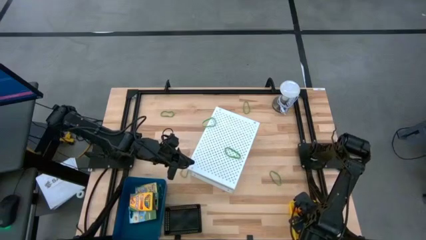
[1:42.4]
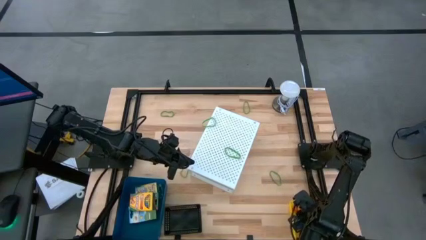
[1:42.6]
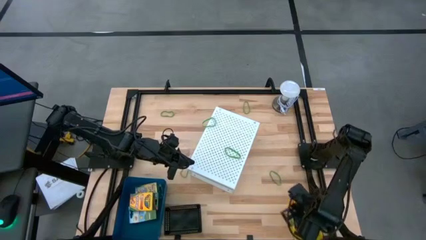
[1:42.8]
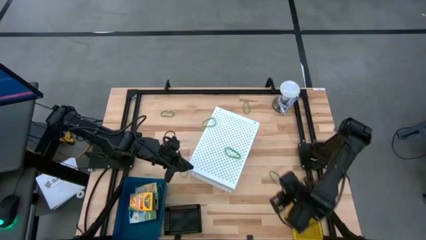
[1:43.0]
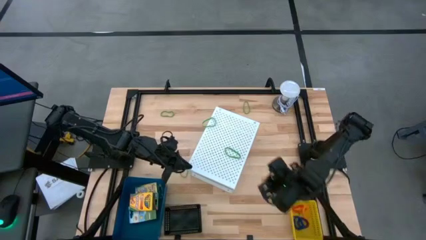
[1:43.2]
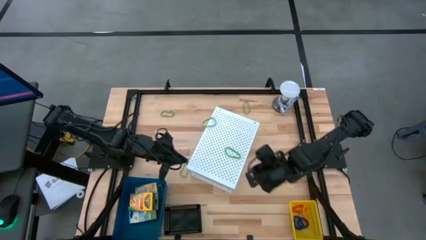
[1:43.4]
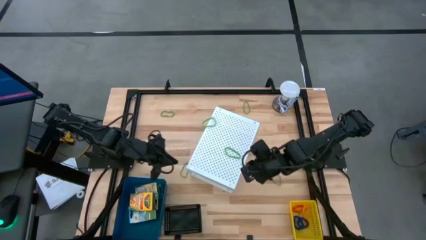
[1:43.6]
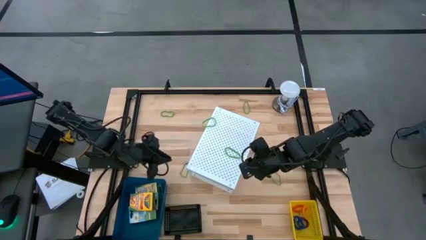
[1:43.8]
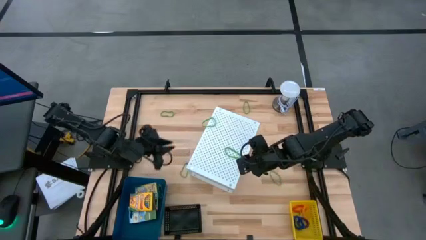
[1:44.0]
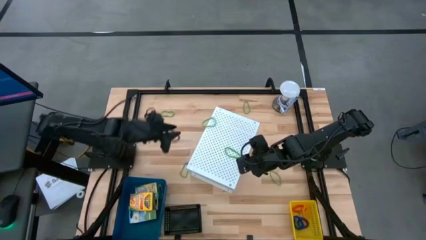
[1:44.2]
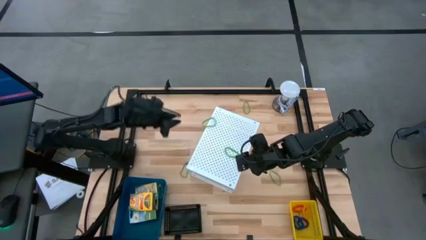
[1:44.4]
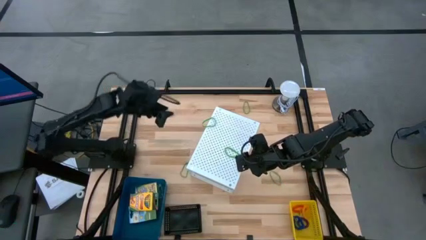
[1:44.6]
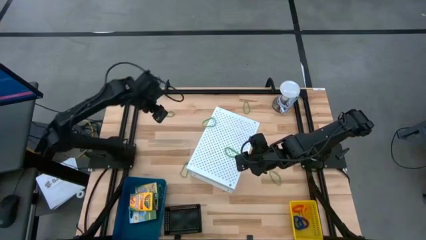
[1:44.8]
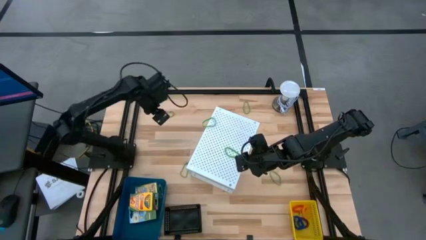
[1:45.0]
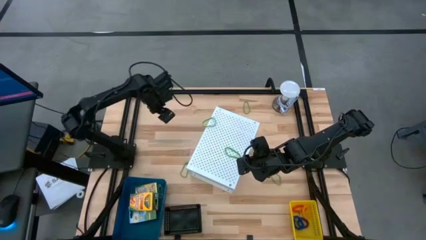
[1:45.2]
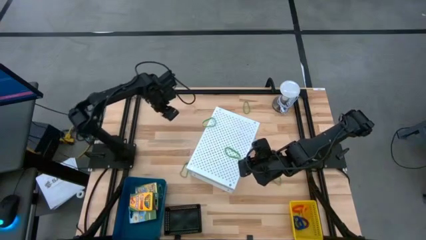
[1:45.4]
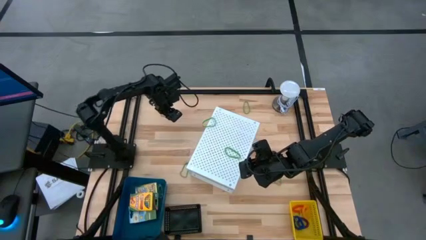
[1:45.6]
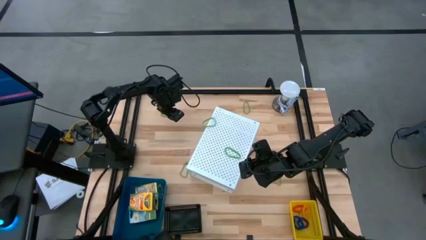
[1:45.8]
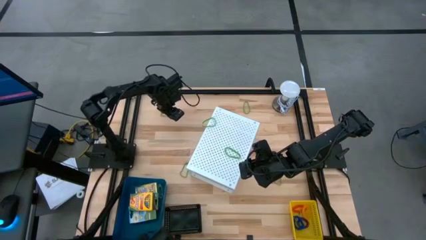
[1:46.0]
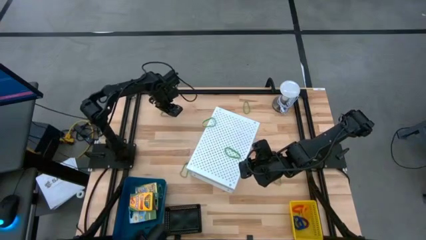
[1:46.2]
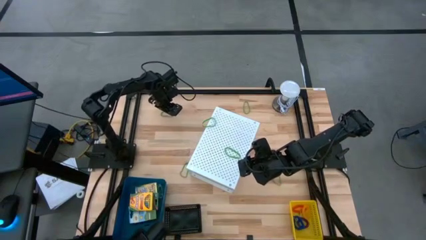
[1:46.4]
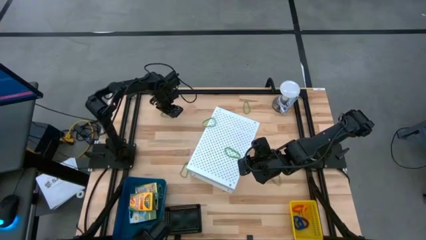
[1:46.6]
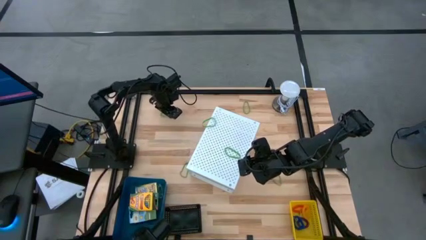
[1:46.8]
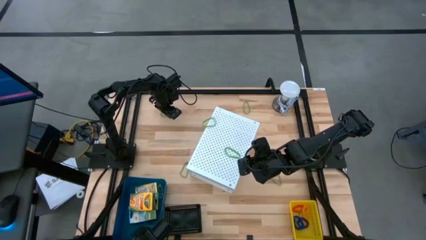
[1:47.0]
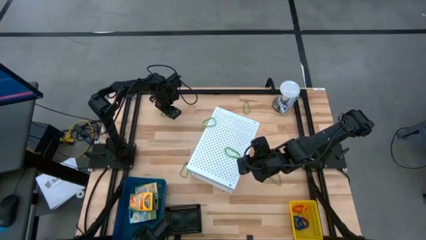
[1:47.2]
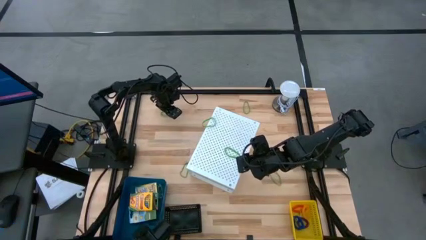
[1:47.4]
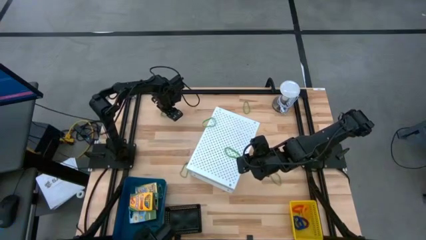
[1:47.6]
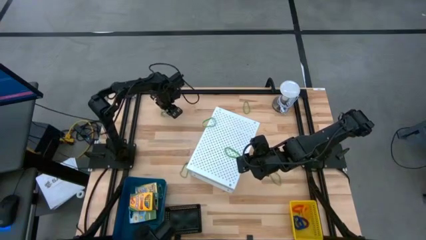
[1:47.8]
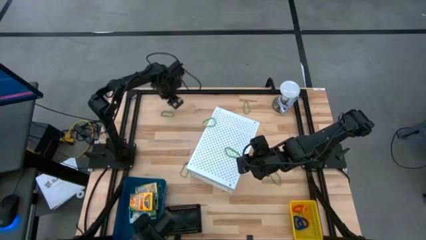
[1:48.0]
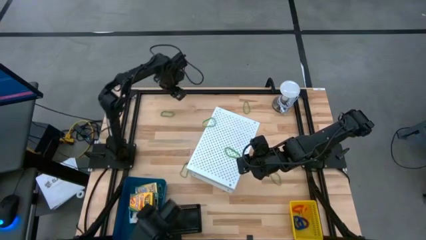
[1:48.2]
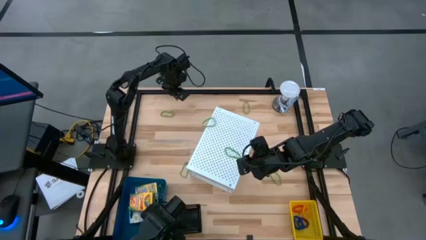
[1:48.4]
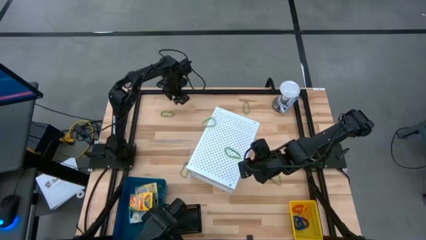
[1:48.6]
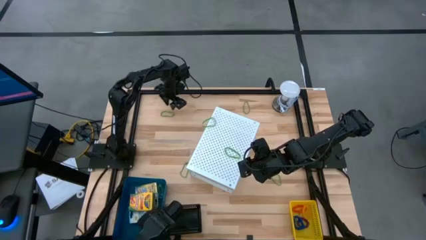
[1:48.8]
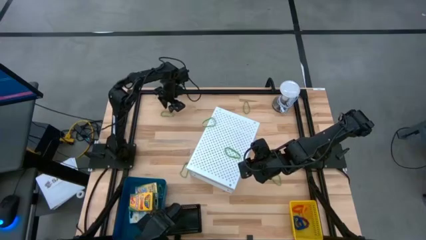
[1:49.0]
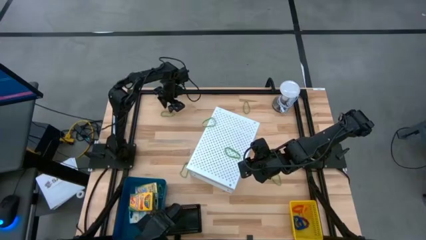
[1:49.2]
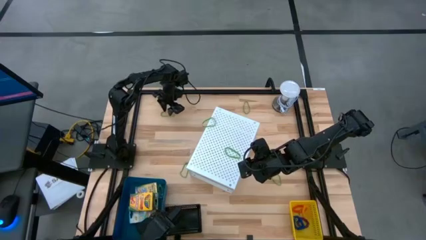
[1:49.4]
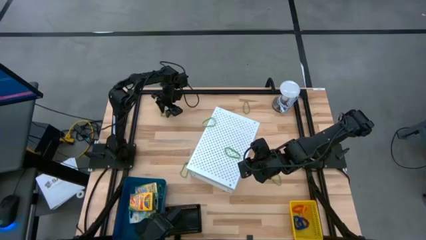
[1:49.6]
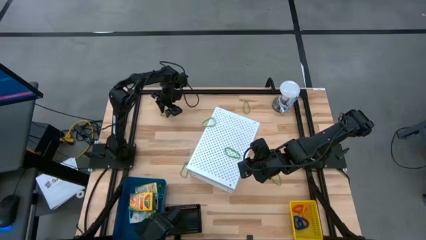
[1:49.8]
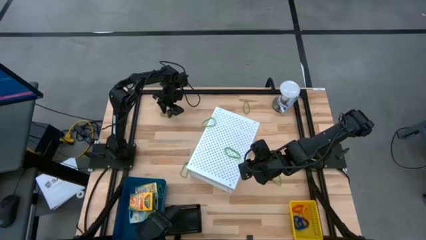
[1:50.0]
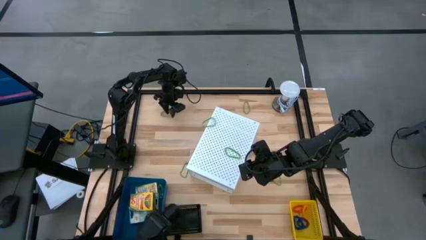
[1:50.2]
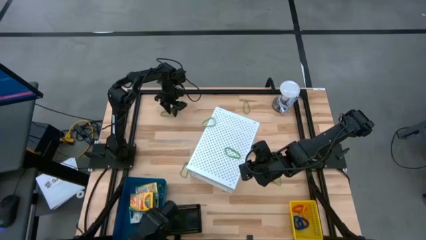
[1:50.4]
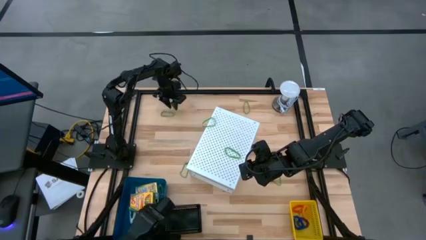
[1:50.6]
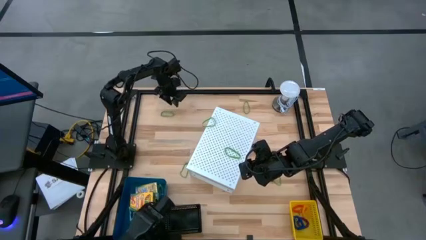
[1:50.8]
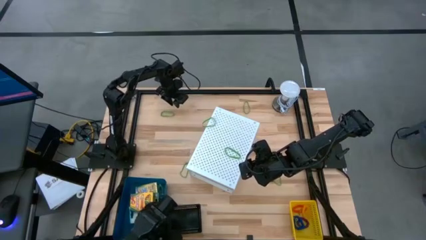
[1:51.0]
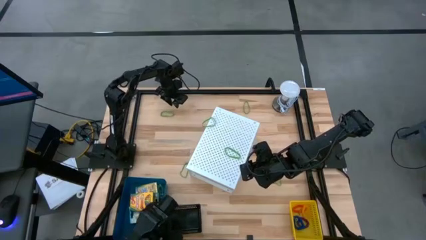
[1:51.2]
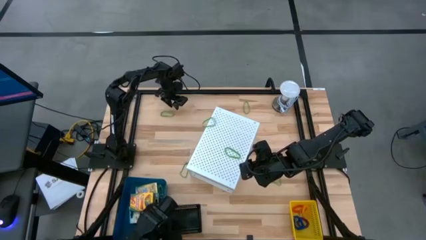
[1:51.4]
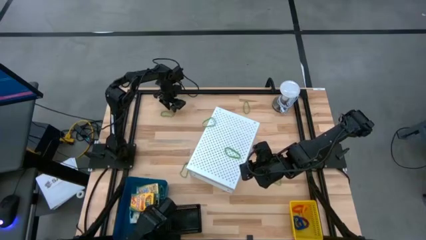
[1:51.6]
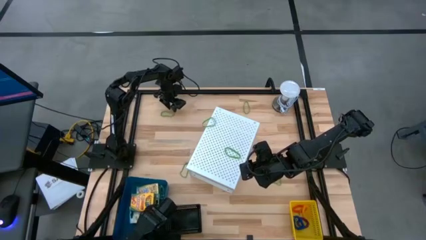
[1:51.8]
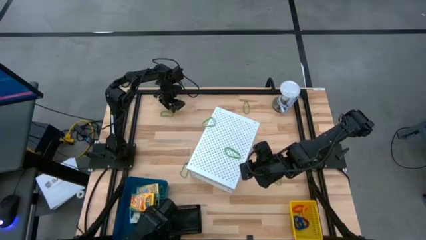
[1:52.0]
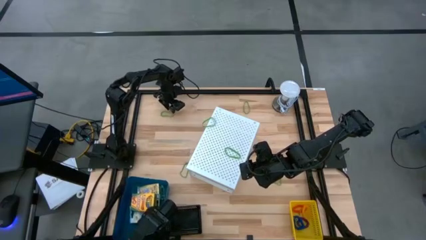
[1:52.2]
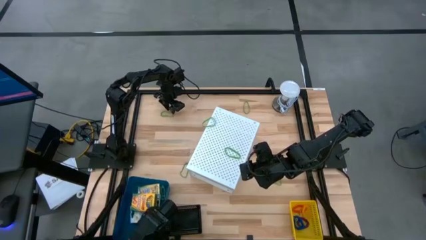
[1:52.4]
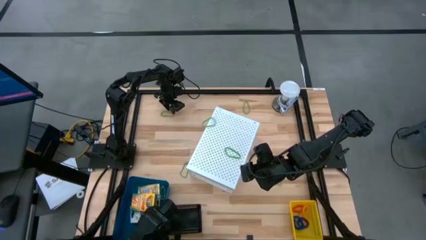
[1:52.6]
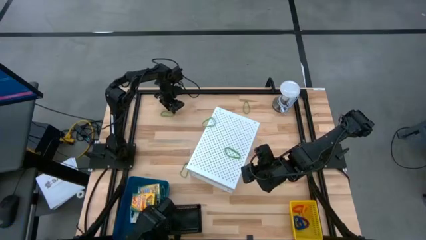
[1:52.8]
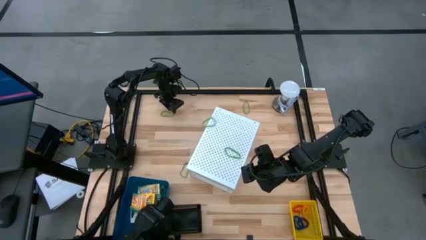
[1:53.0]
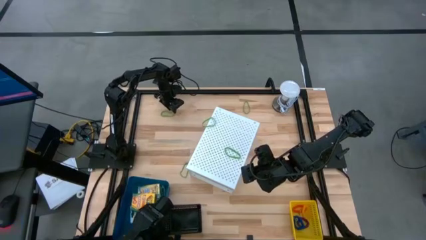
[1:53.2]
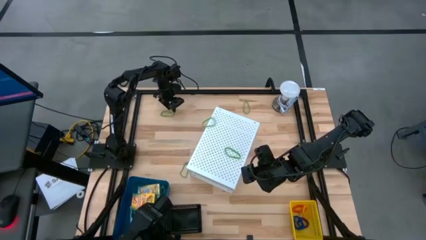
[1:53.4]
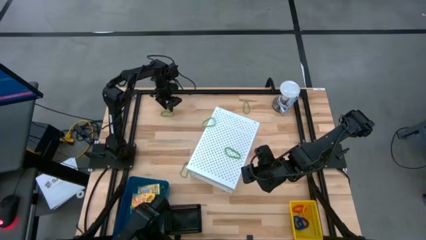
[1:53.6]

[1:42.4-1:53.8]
Task: Pick & Place Office Desk Supplies
Put the green rubber band into the black bin
